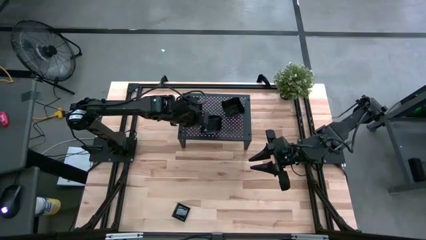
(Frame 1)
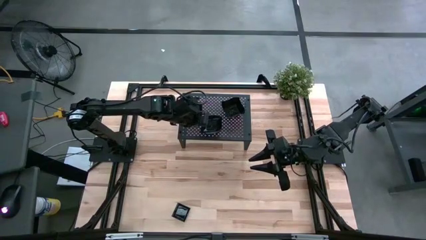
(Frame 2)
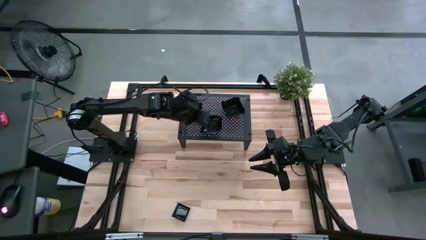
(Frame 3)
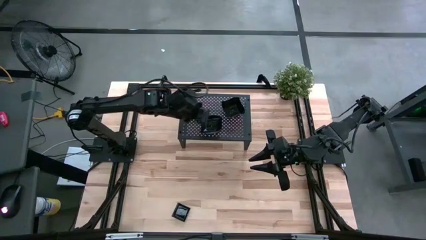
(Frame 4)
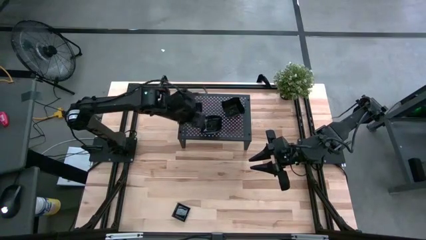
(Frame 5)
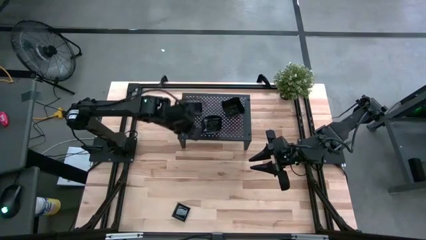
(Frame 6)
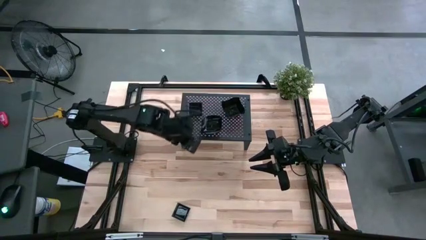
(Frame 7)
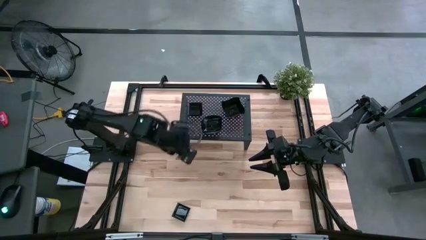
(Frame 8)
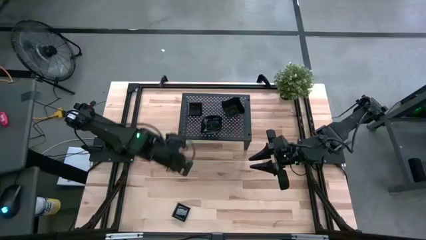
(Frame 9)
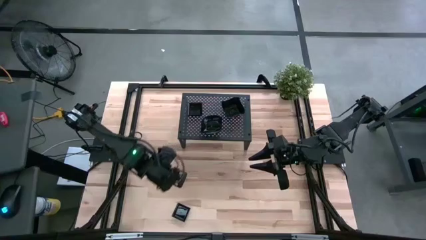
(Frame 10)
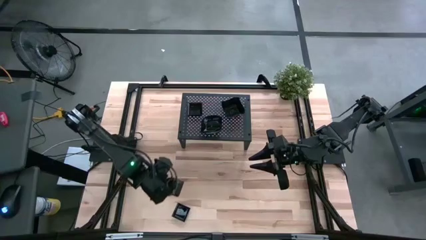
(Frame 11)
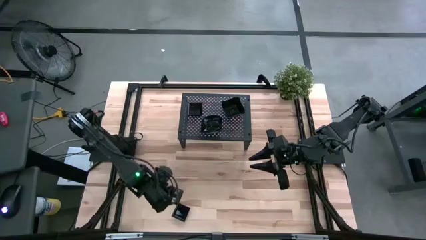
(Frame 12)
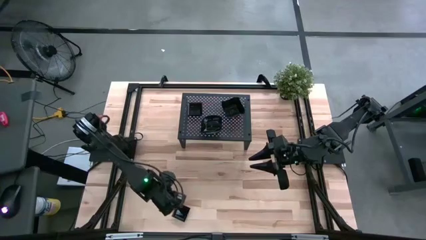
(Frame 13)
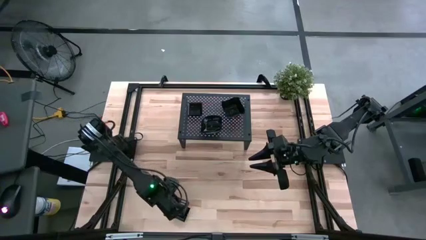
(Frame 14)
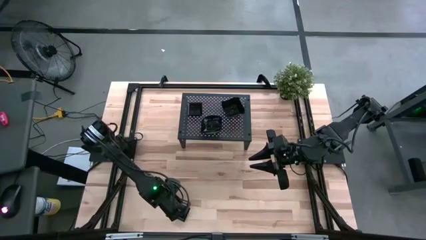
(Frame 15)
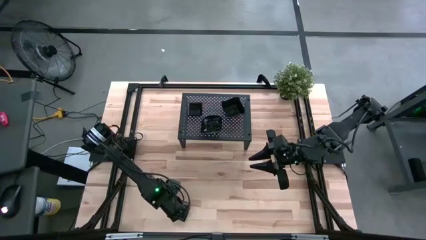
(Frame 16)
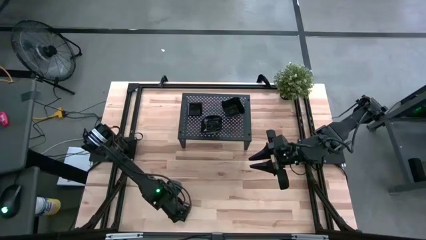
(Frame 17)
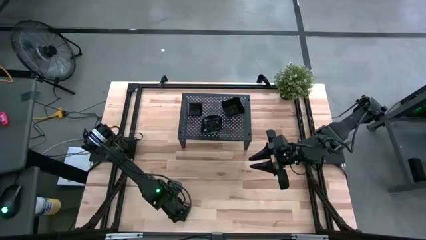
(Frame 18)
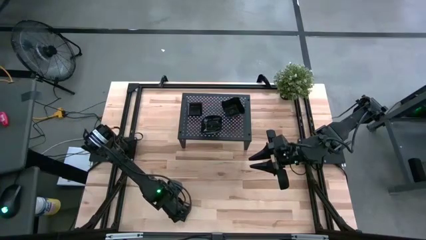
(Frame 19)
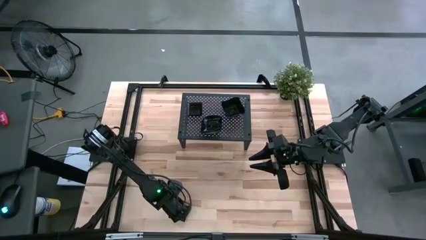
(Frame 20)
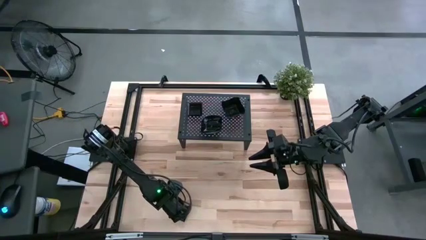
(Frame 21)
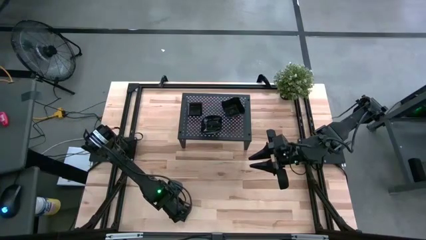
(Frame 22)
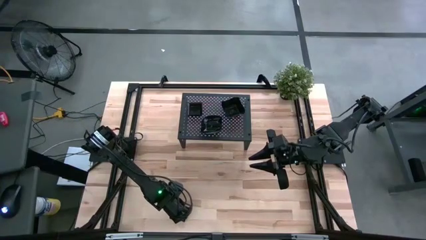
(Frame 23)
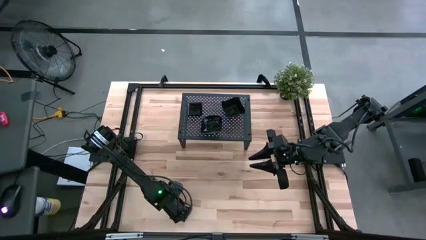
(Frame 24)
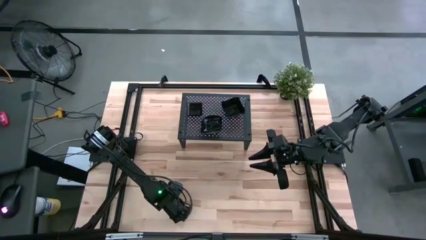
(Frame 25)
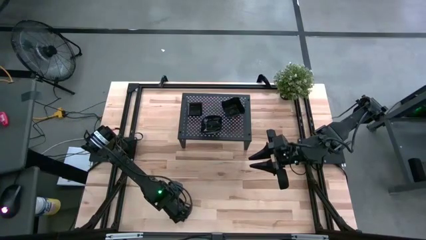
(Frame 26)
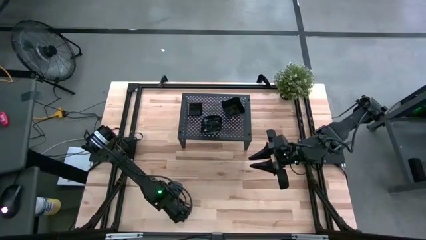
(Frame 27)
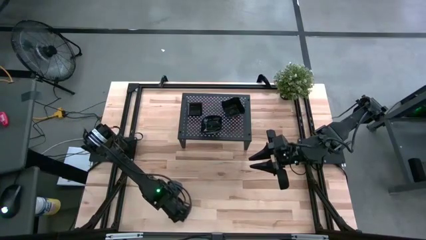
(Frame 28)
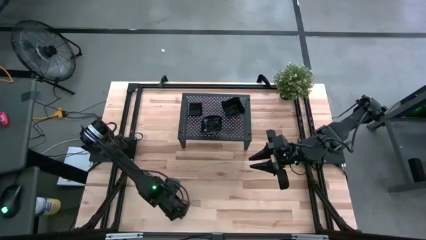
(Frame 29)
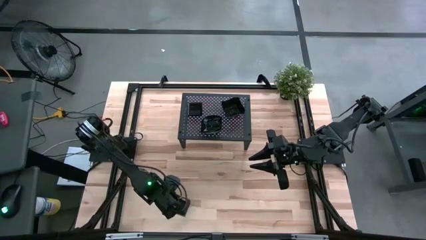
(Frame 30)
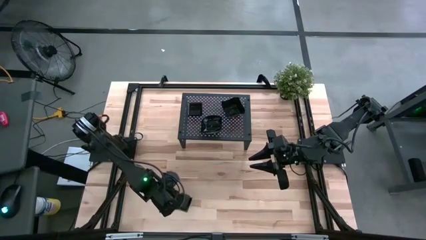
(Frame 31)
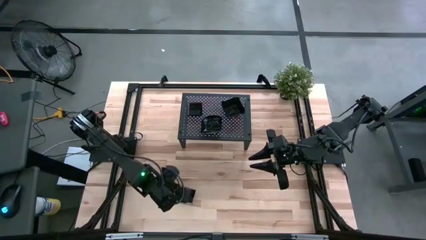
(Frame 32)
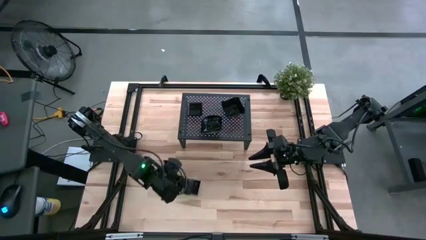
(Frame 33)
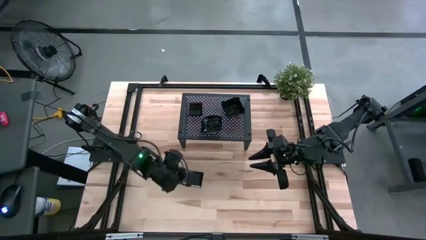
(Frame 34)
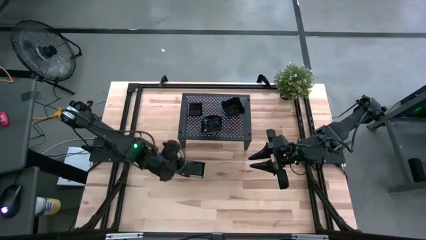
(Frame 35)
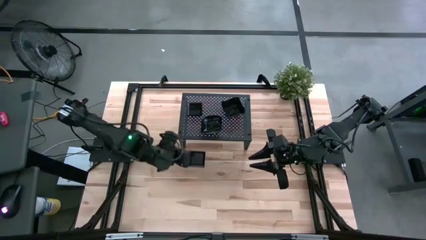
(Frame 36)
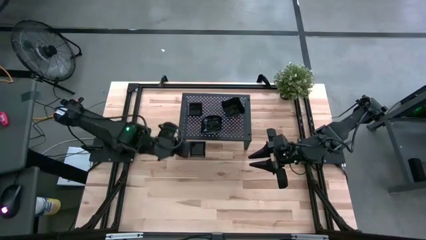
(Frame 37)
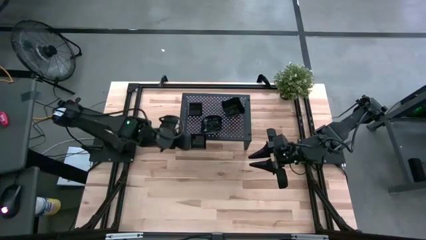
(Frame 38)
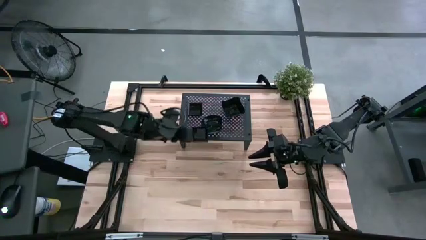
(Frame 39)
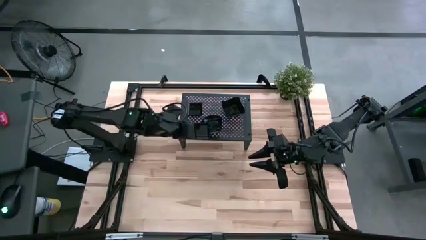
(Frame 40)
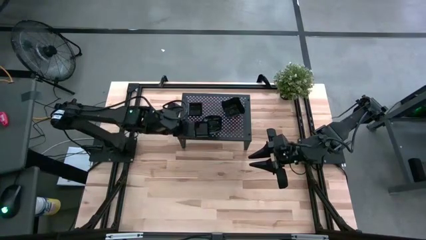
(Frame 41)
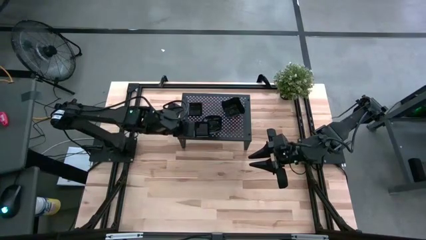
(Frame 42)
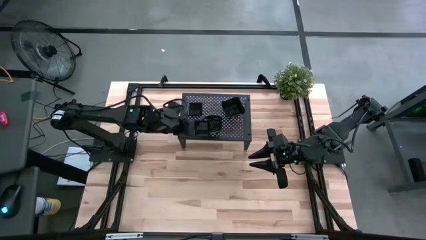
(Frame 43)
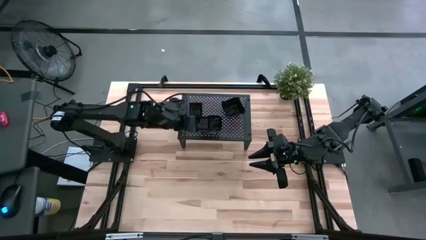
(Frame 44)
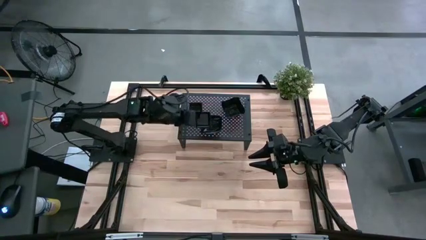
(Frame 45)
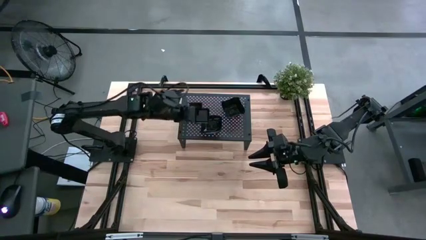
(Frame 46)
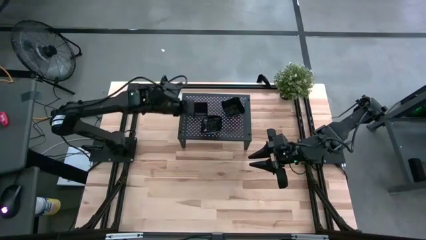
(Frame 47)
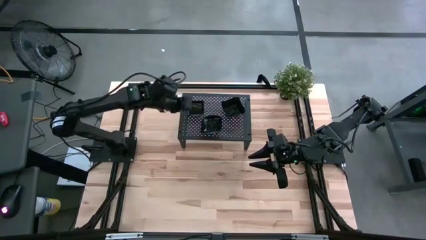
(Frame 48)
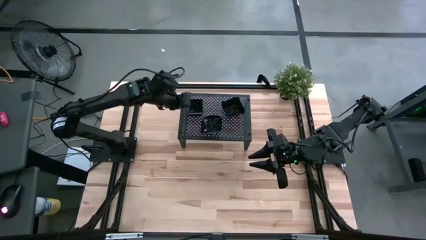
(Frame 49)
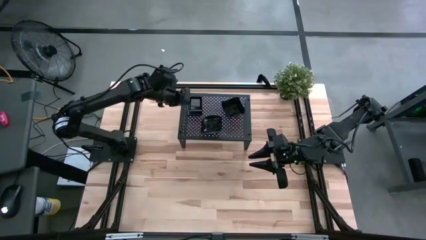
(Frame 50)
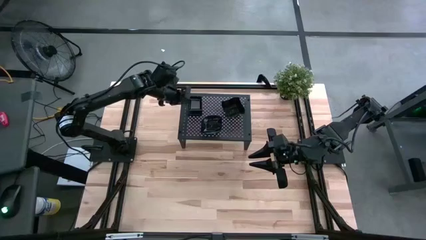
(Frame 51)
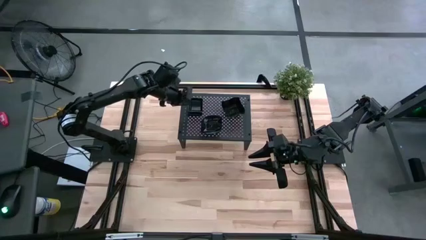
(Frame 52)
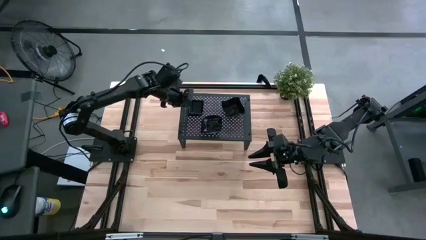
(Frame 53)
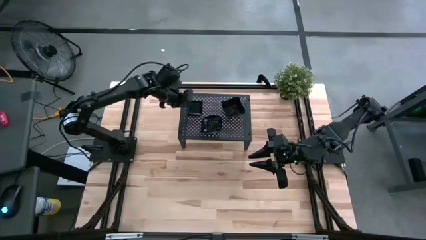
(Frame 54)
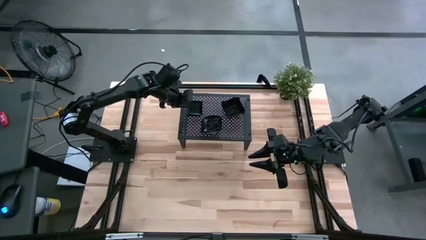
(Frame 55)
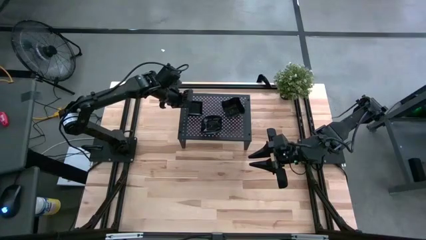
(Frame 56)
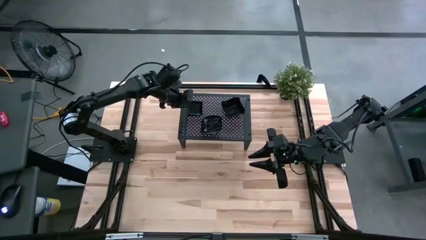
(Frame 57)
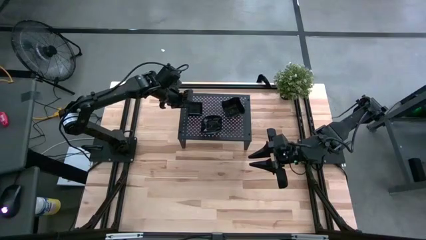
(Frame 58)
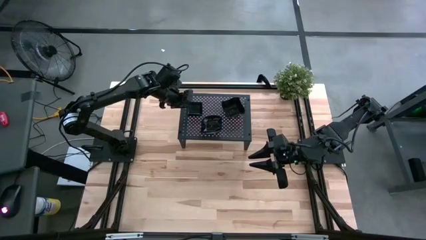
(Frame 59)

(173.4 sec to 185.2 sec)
Task: Pick & Place Mini shaped plates
Stack the black square plate on top of the black square plates on the shelf

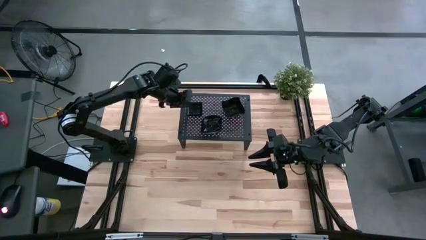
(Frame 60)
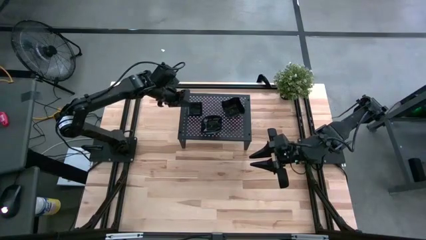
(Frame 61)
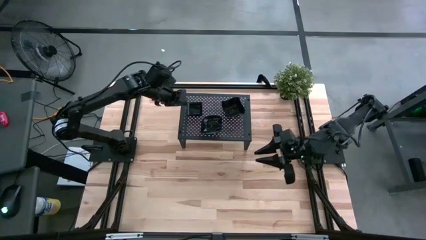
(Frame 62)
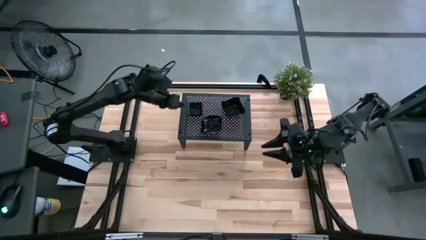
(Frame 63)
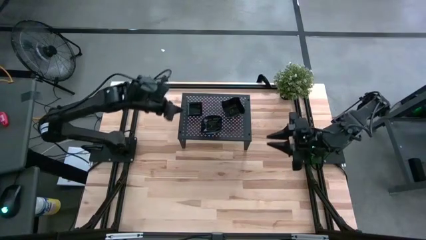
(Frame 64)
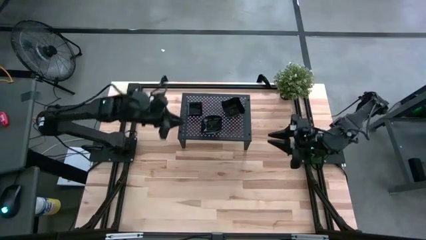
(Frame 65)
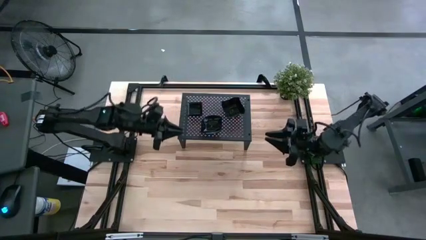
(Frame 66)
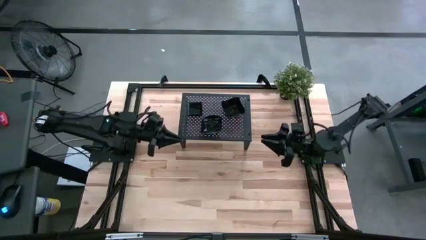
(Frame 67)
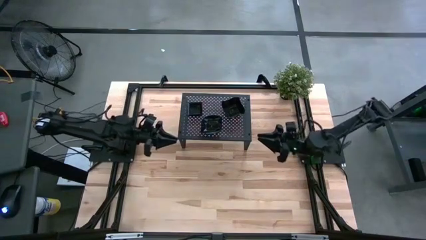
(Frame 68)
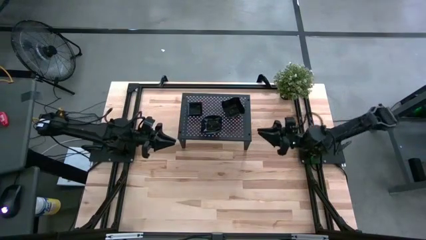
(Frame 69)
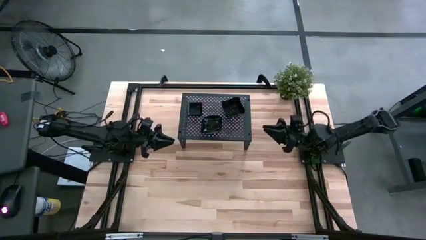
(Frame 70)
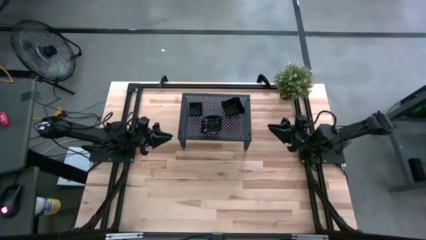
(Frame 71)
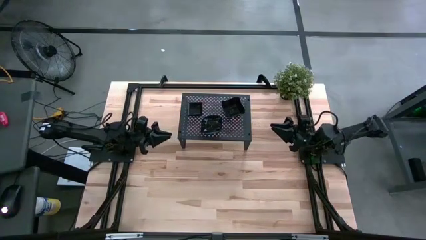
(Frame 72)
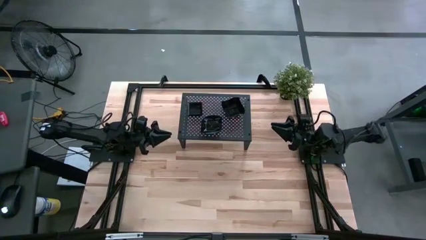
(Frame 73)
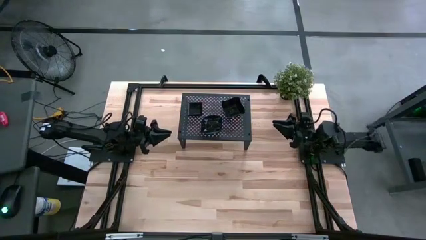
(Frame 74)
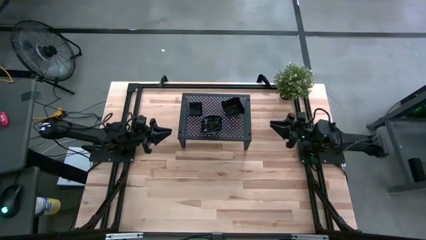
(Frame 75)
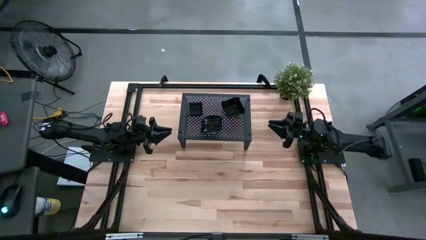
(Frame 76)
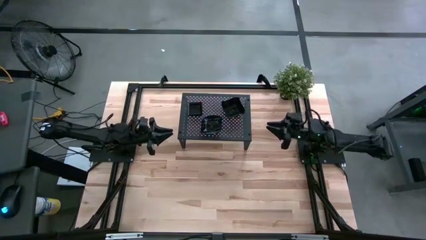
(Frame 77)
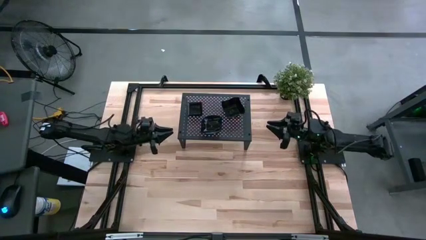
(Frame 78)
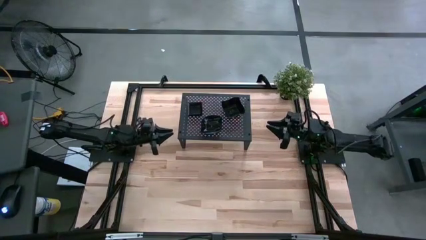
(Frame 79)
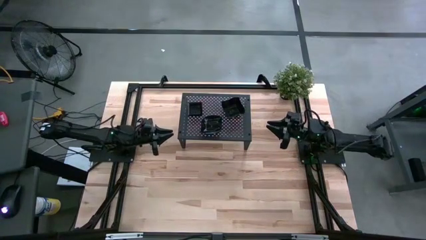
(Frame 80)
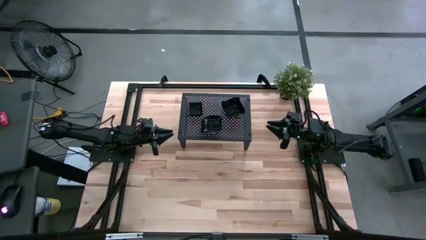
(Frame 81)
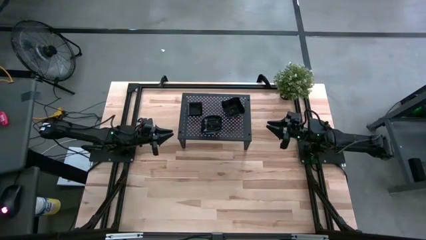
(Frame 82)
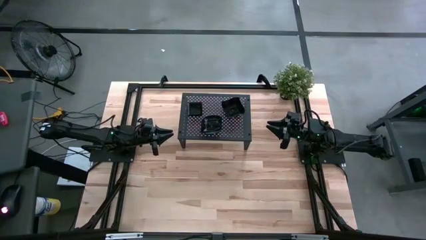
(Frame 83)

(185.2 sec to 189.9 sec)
Return to Home Position
